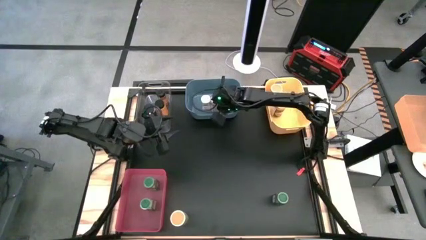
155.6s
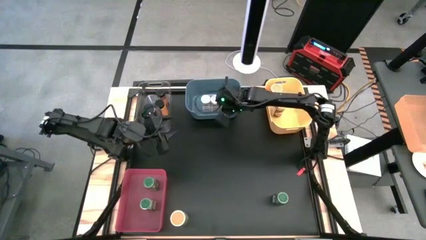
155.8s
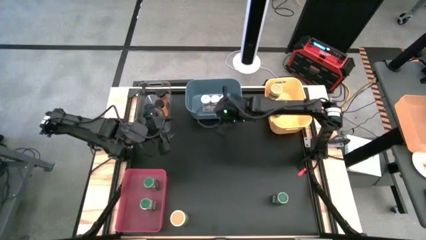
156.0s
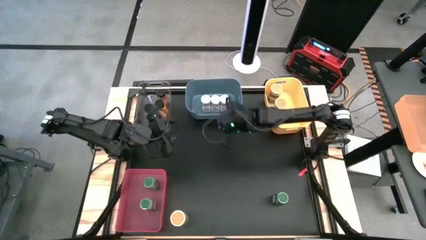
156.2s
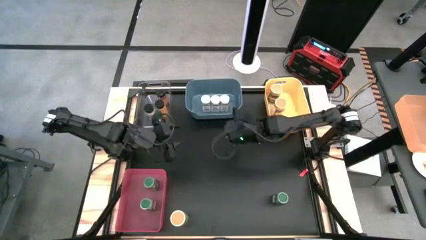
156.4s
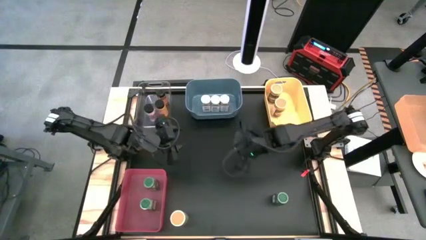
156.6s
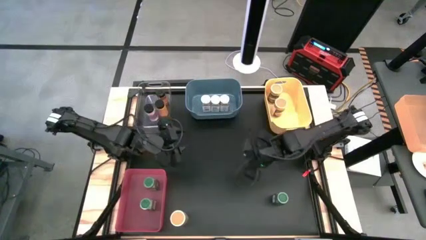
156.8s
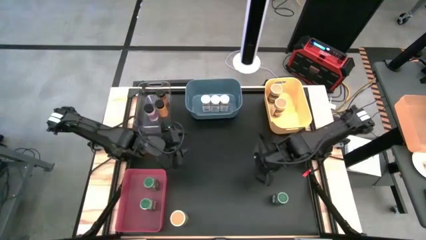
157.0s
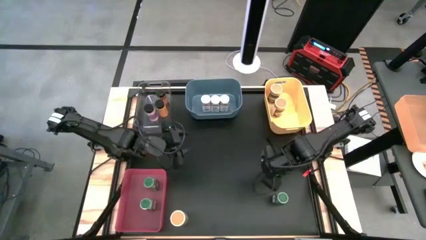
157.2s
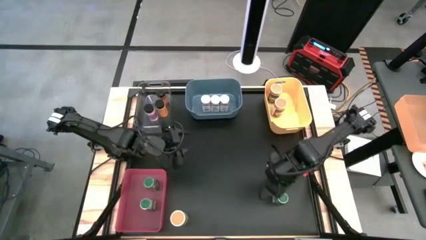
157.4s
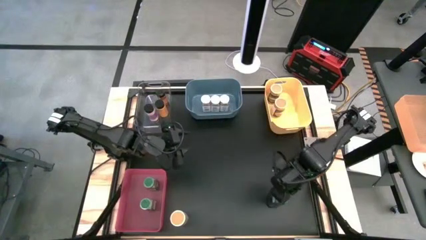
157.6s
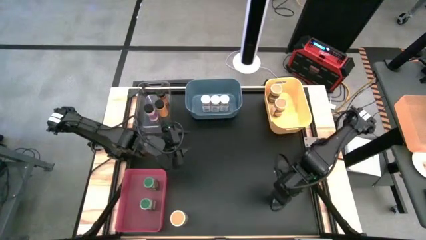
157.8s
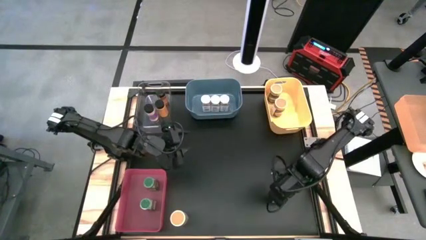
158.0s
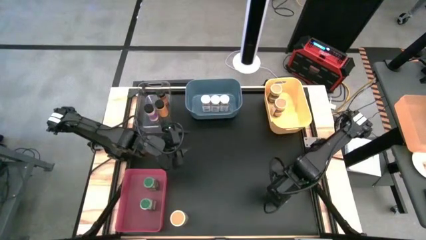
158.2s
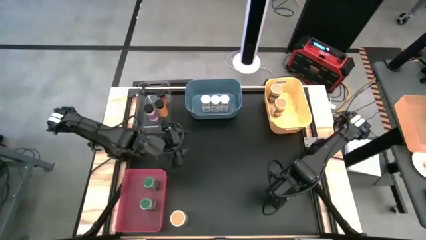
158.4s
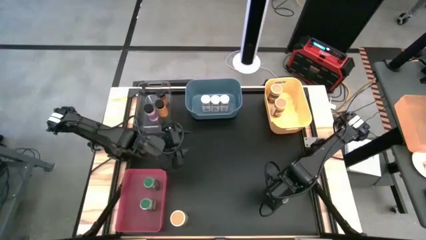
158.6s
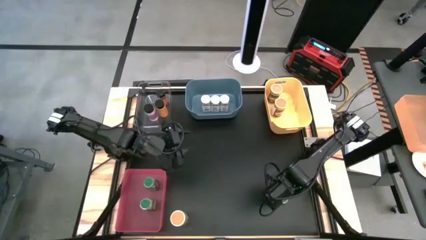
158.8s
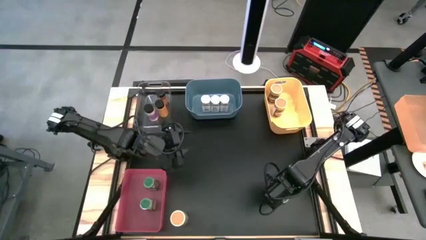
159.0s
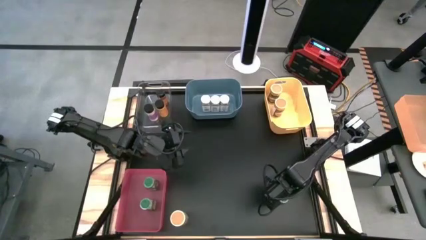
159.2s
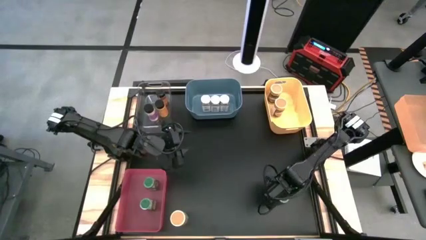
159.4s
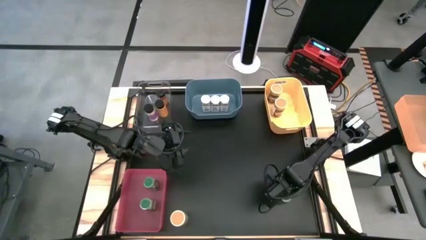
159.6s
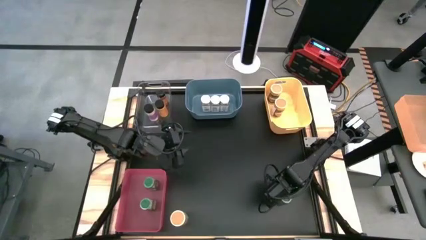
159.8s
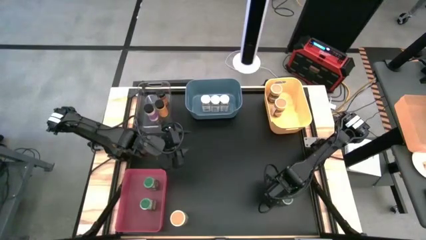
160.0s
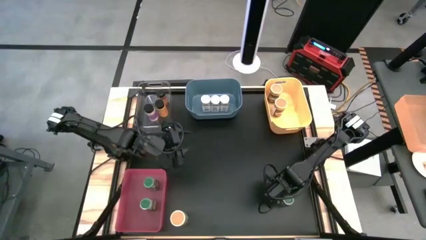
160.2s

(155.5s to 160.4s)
Task: Sort spices by type
Put the green seasoning bottle into the pink bin

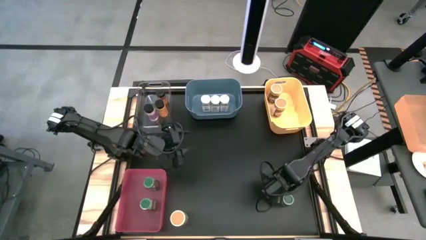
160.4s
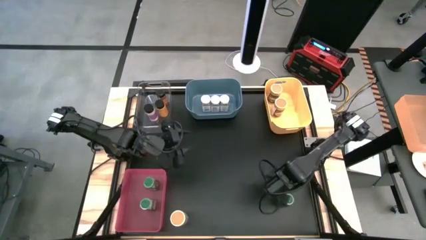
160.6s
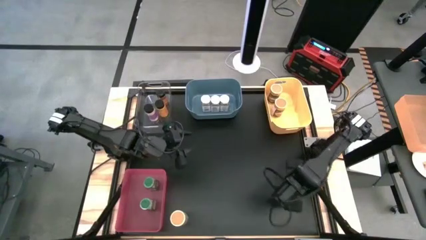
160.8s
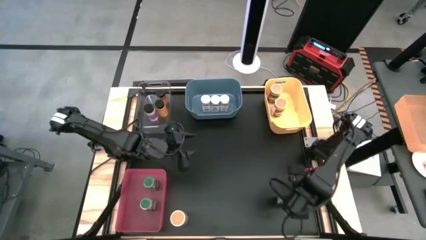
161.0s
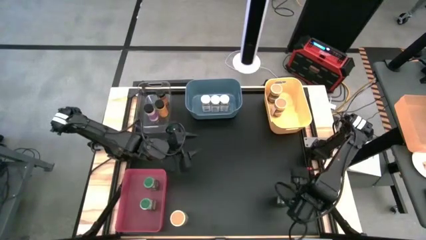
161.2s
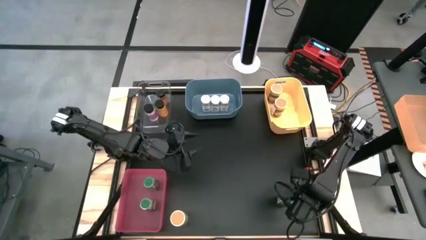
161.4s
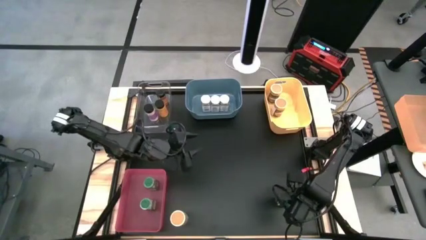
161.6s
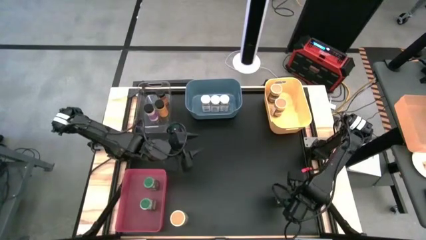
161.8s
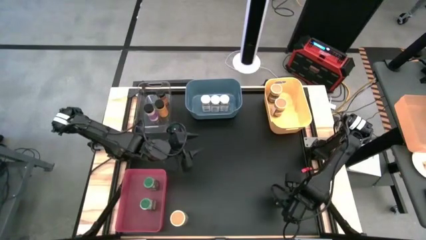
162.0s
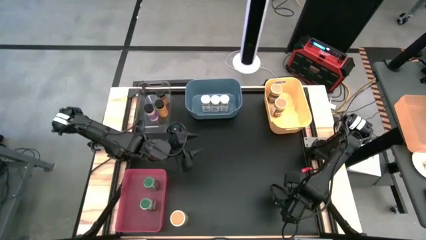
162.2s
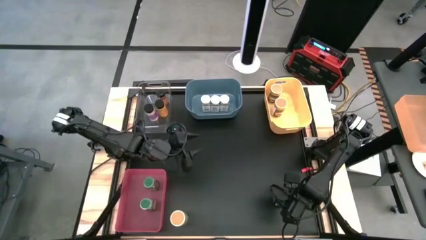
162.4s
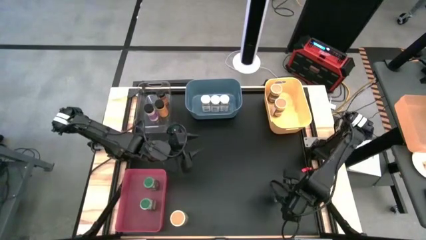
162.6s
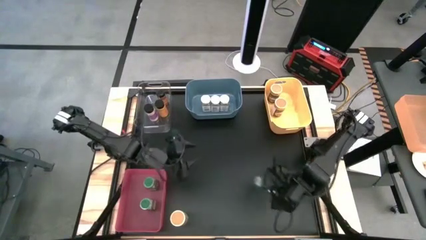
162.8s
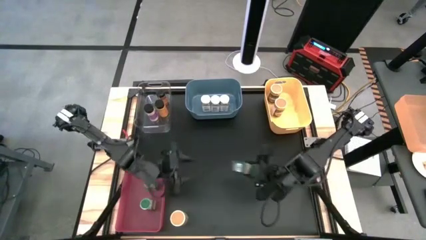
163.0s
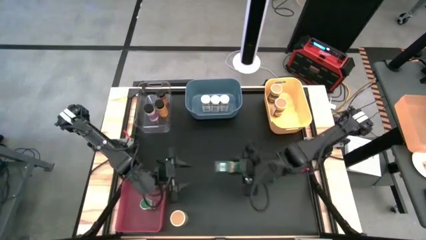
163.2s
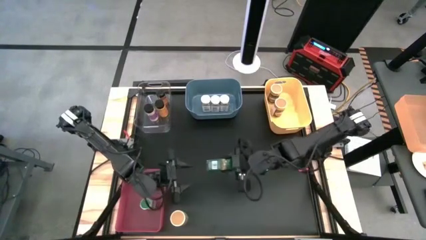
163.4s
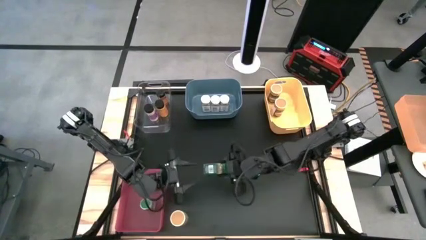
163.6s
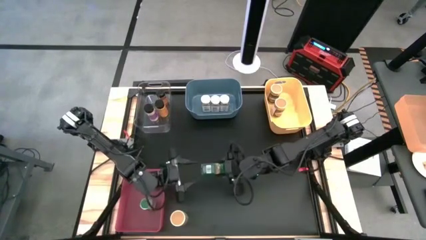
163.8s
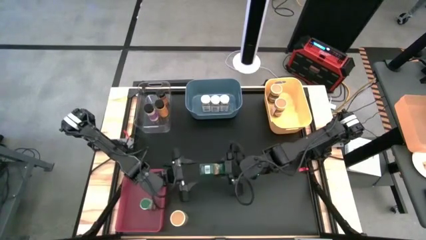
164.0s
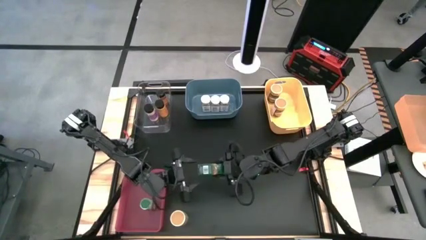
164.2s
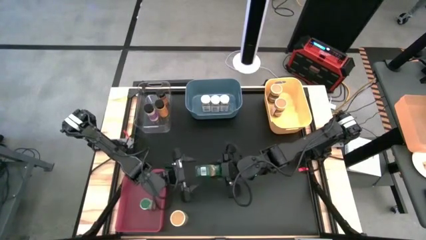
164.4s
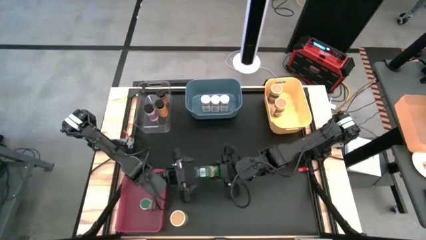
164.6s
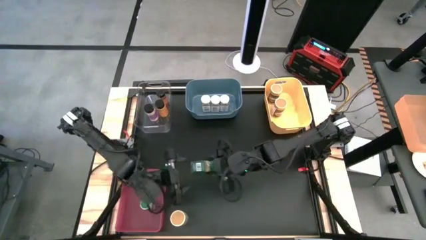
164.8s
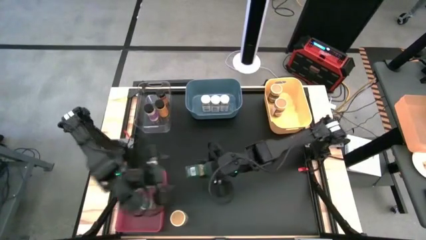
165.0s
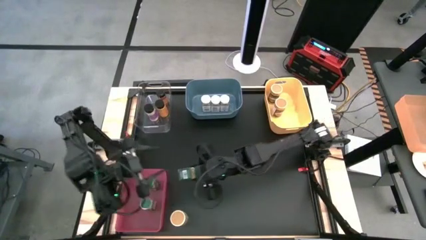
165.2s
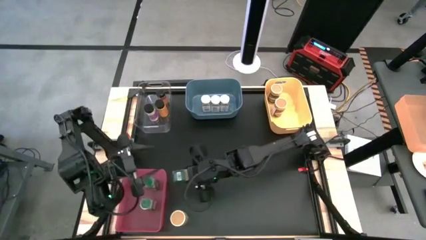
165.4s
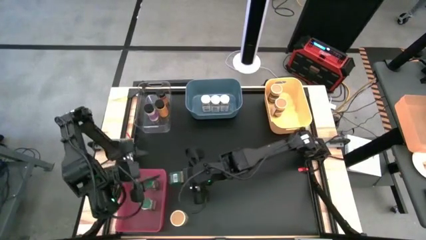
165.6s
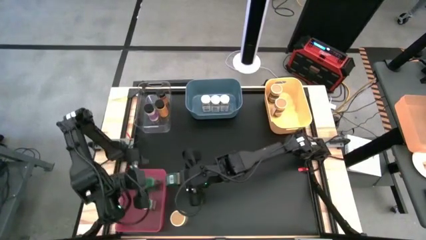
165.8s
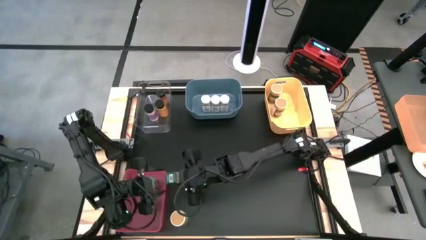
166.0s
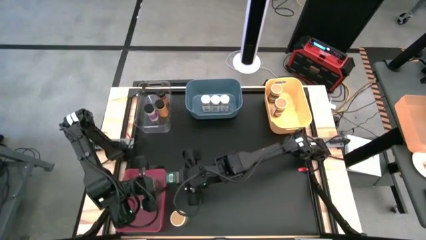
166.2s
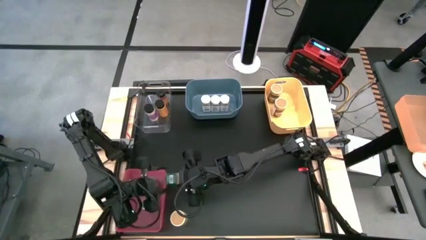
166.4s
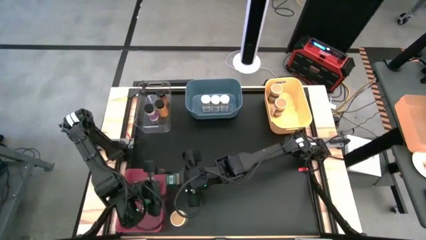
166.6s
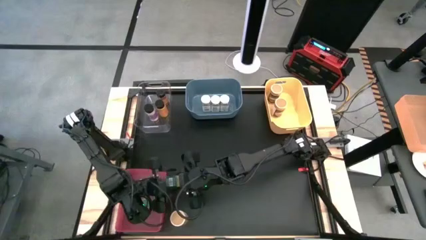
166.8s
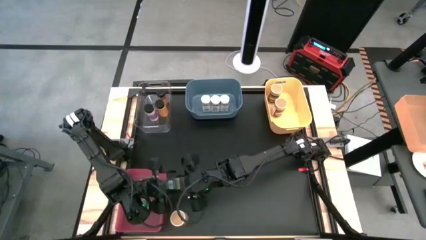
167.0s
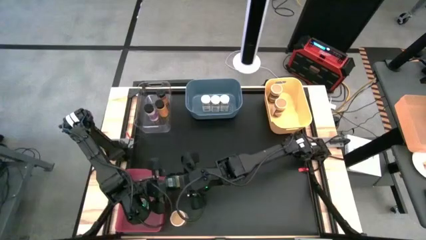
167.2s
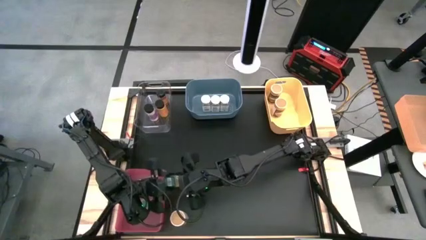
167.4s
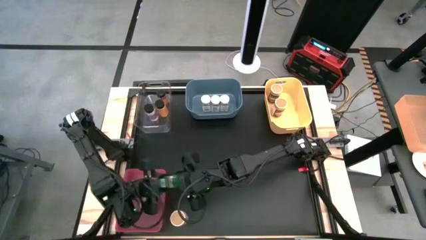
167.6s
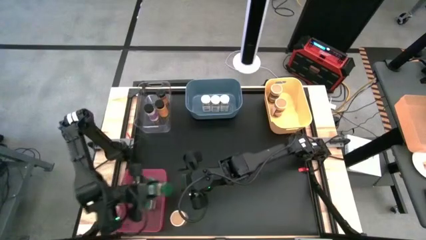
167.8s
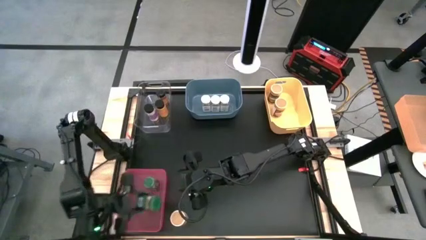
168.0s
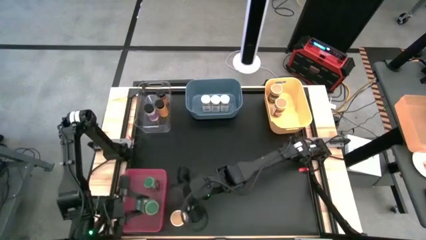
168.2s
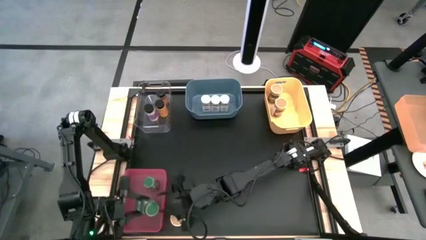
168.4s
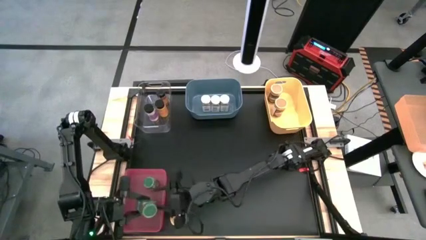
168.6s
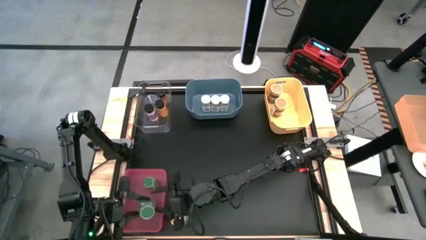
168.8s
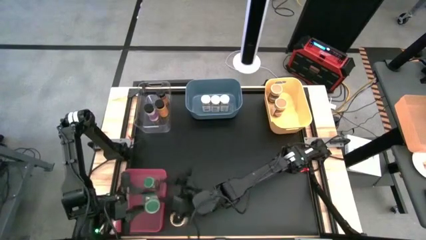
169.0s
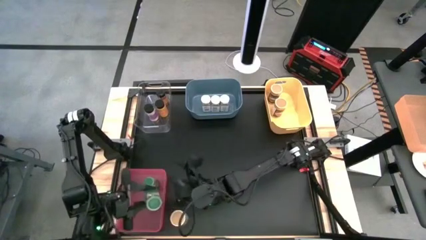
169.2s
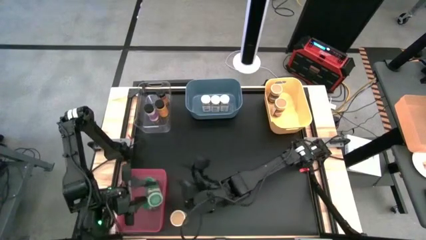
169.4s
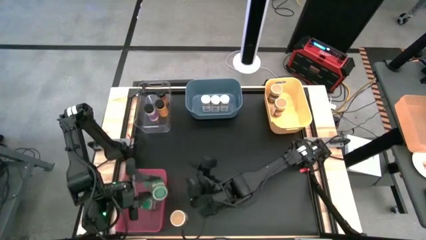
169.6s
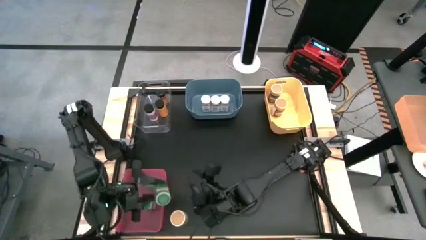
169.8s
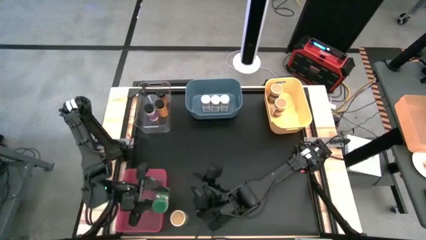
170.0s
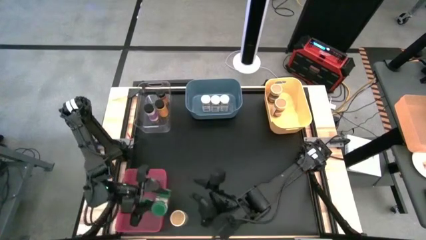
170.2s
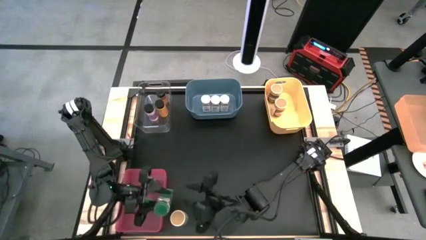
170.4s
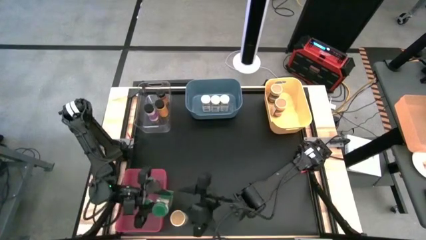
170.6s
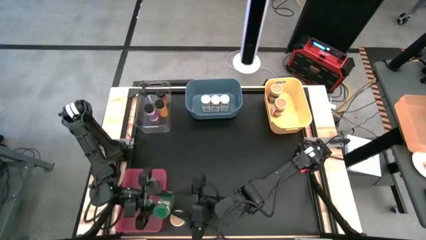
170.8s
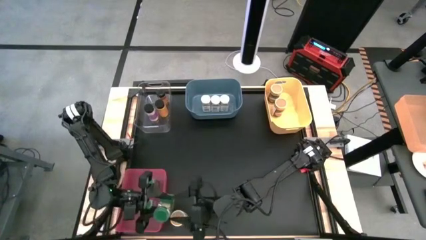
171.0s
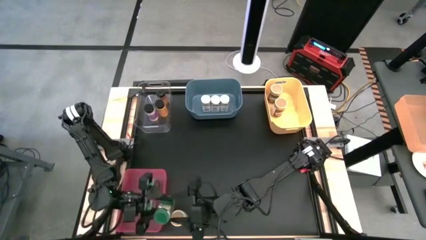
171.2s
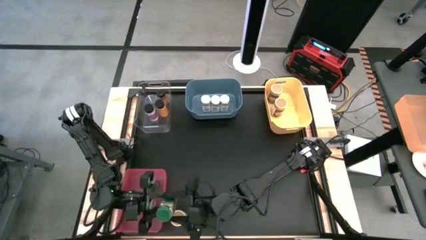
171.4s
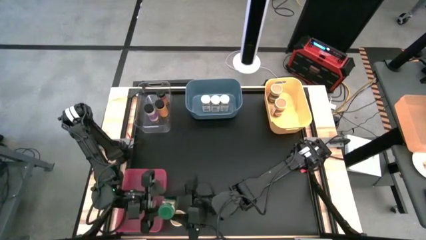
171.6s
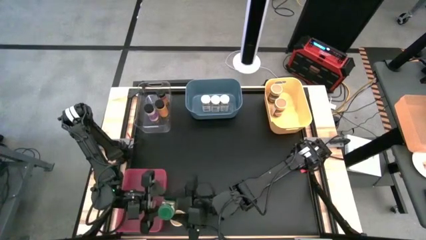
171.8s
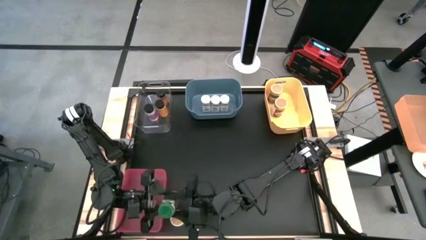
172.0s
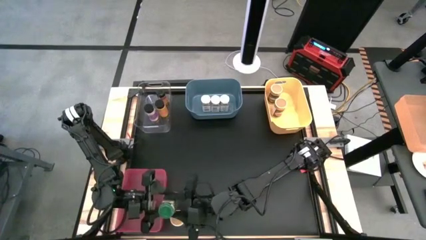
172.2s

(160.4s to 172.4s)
Put the green seasoning bottle into the pink bin
